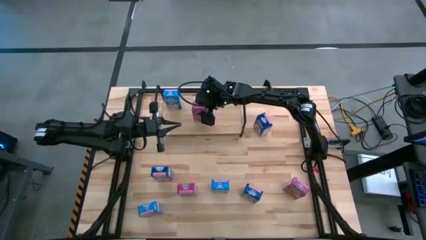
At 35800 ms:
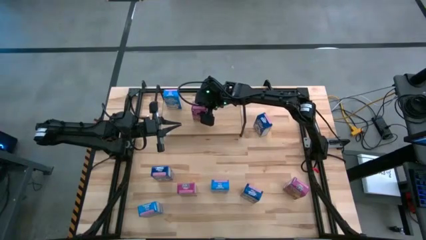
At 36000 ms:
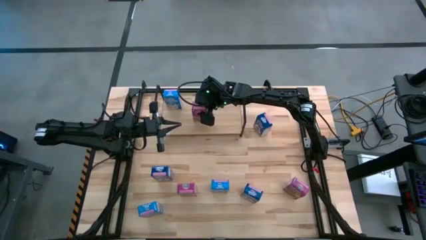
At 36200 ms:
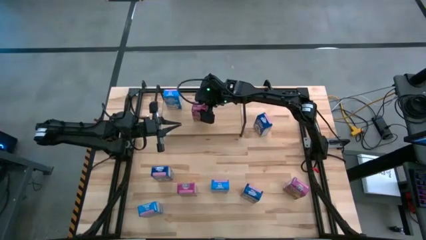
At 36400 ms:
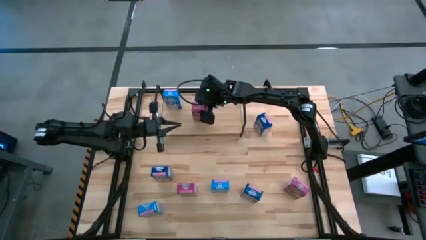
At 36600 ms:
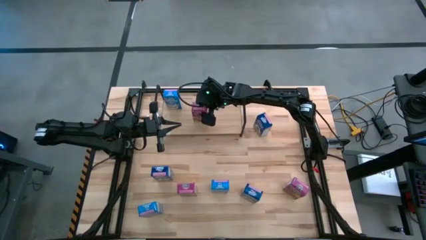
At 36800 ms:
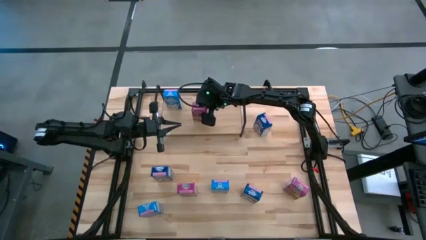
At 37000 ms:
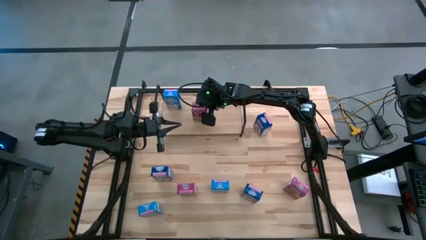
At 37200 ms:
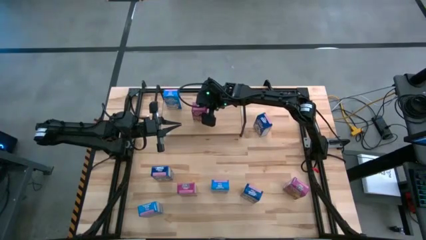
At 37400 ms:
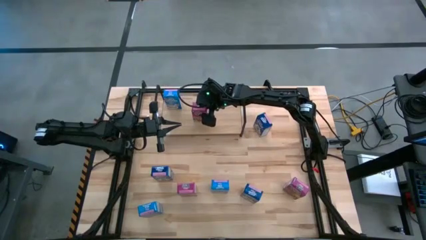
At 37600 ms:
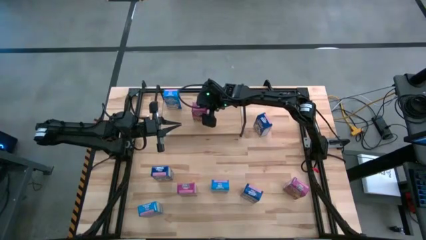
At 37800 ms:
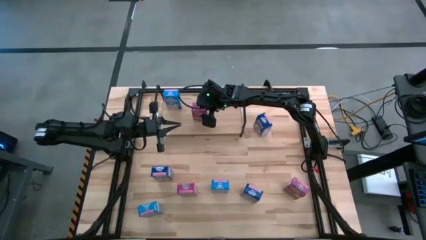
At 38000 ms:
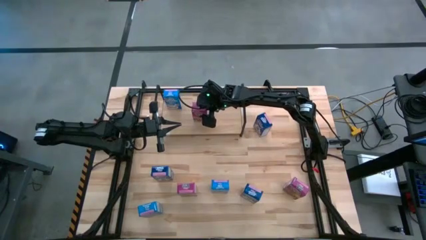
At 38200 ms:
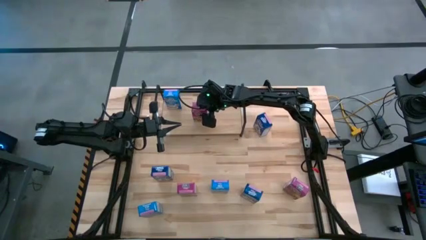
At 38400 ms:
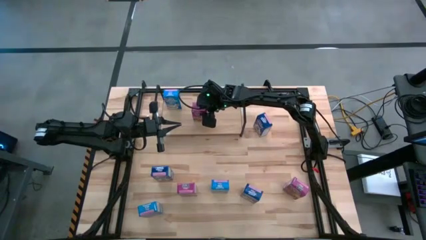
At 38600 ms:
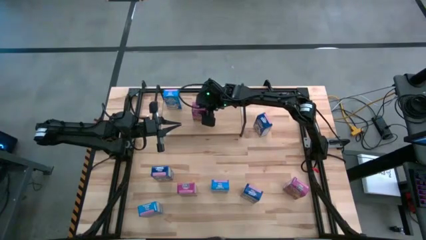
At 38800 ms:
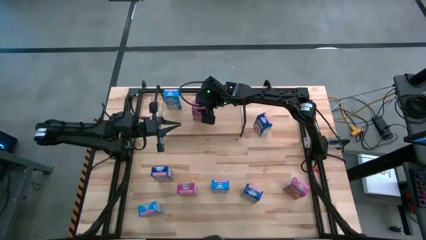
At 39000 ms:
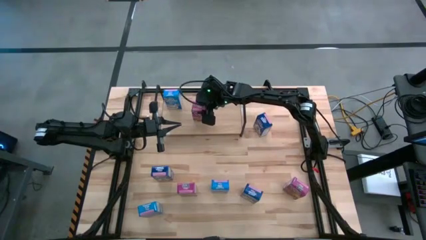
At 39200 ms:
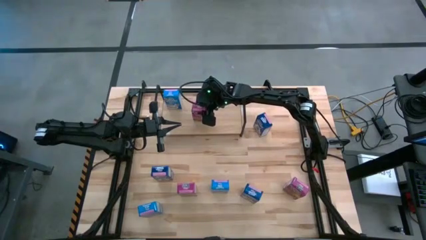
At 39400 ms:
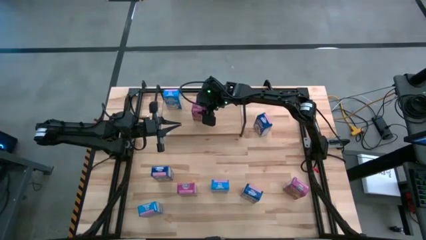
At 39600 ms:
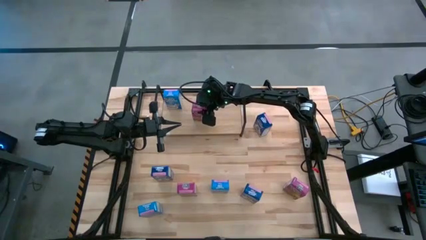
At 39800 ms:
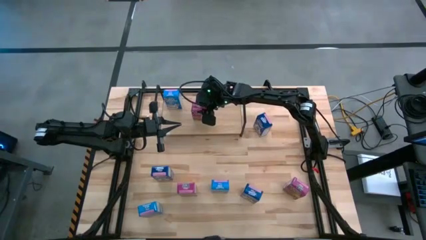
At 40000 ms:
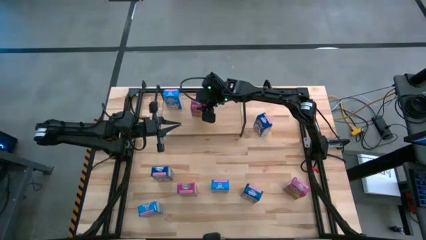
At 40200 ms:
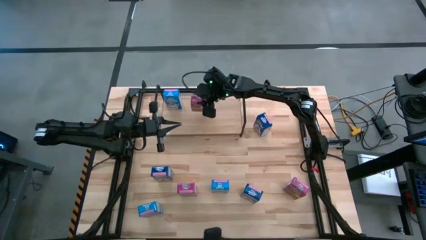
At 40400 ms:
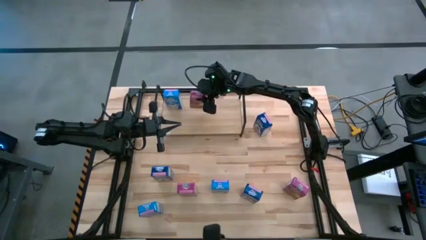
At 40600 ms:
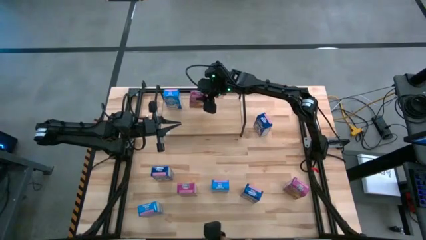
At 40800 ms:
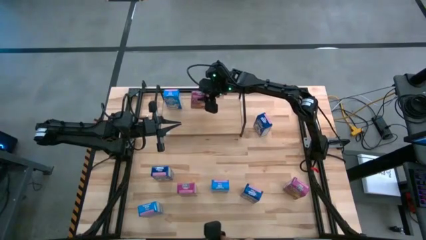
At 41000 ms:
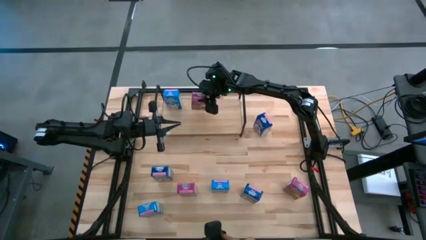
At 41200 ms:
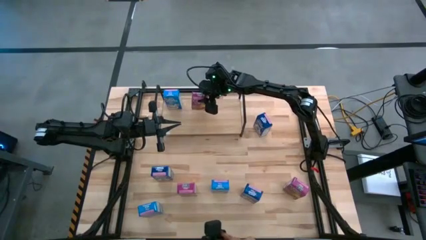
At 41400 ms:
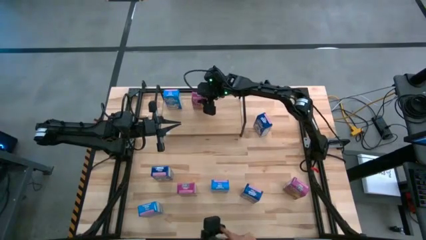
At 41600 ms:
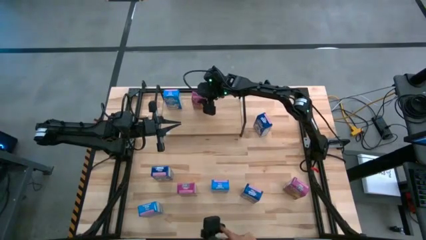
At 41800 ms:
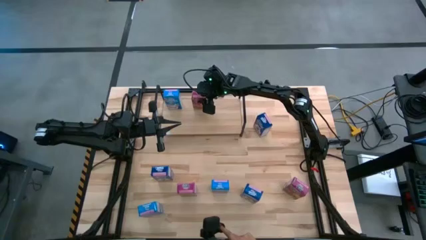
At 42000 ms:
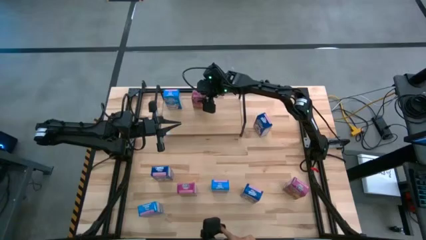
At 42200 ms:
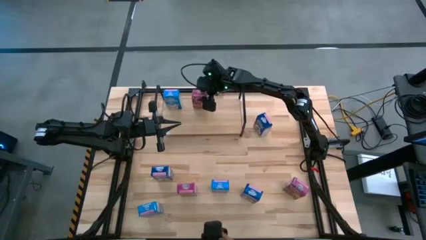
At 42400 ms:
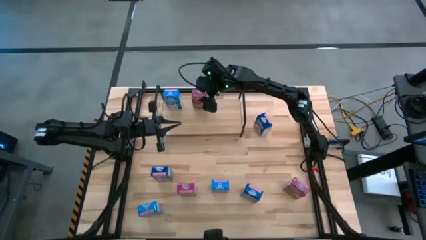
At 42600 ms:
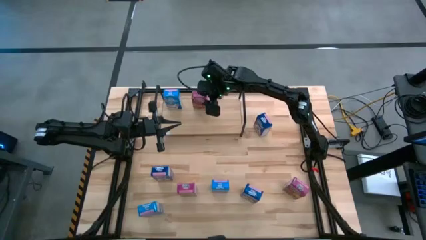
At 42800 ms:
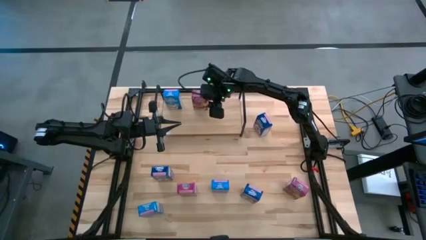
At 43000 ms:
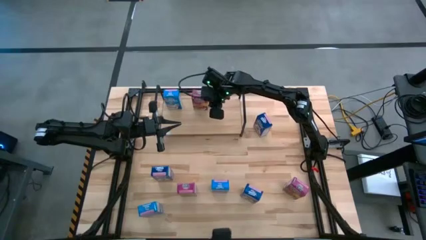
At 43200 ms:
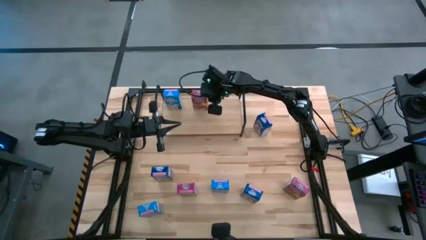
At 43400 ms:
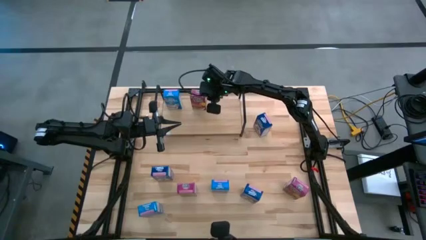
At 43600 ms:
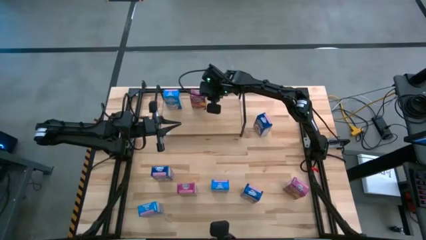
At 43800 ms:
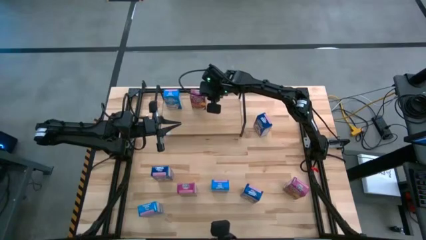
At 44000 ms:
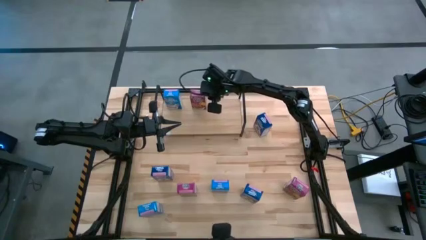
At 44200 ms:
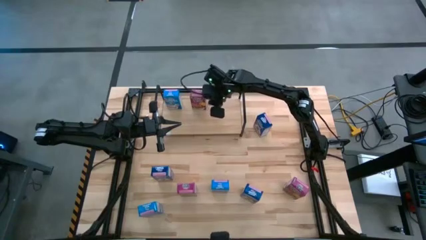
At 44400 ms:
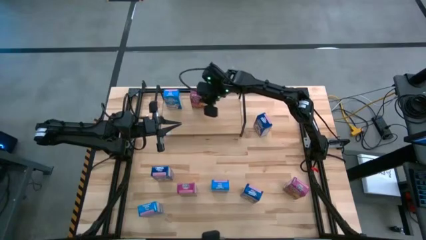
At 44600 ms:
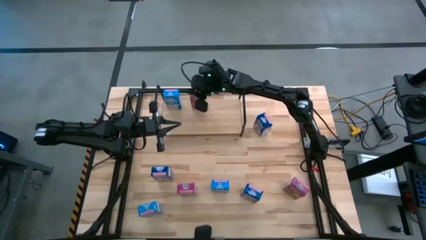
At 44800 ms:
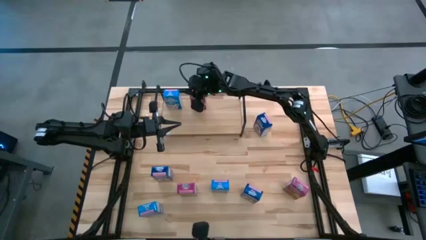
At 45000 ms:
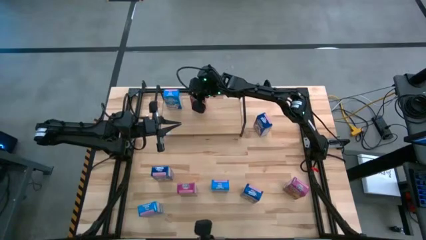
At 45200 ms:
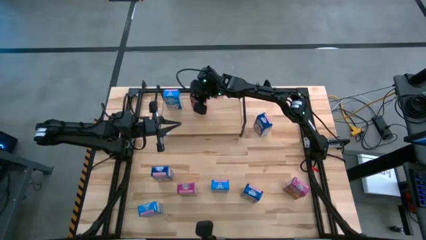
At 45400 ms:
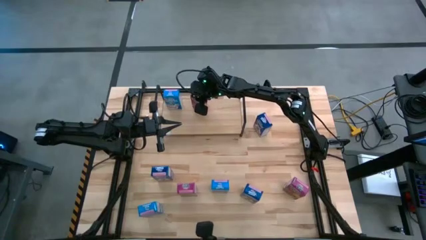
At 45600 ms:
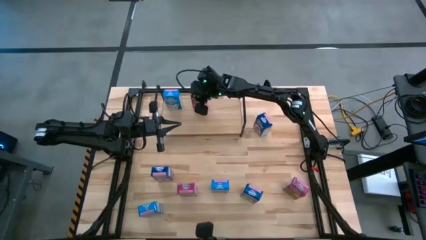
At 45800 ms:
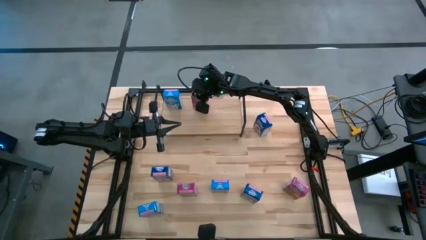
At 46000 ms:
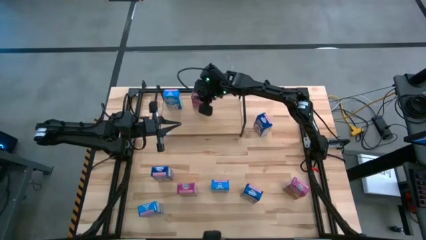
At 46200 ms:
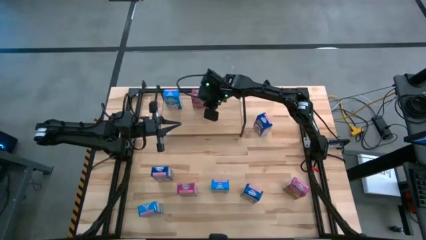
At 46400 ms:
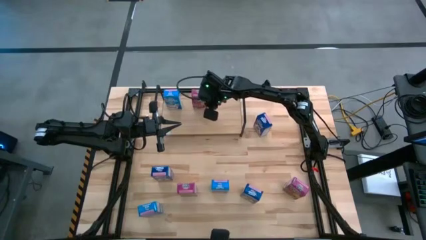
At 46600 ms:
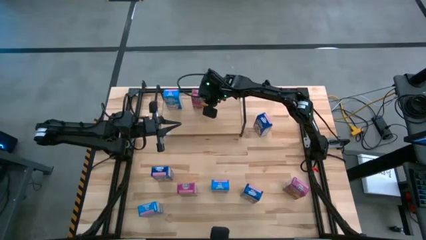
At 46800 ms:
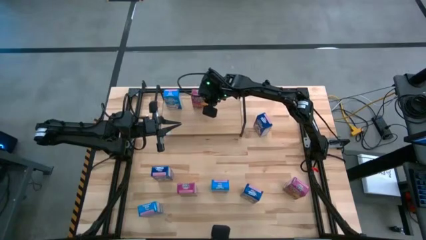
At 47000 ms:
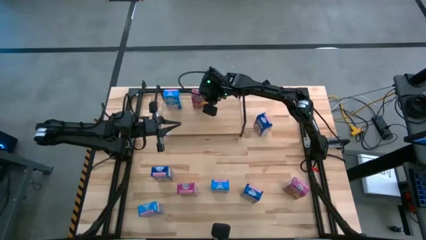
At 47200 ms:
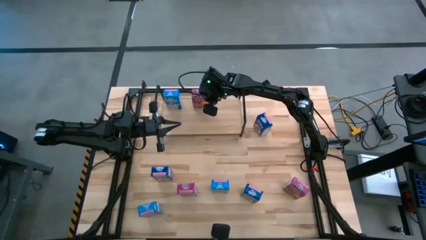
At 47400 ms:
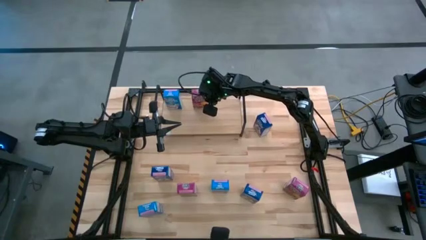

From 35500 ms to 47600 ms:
Task: Stack cereal on shelf
Put the top violet cereal box on the shelf

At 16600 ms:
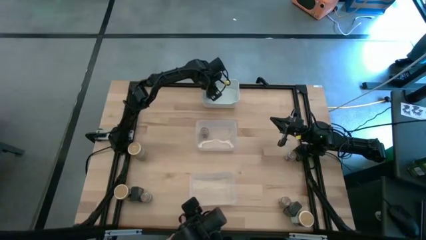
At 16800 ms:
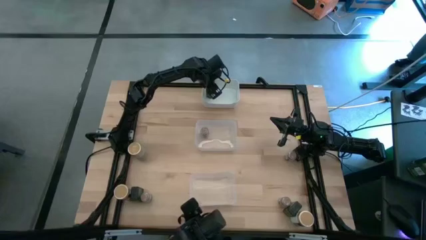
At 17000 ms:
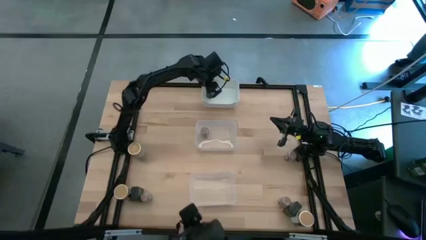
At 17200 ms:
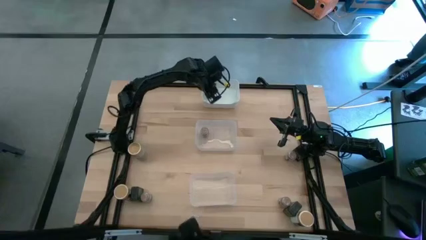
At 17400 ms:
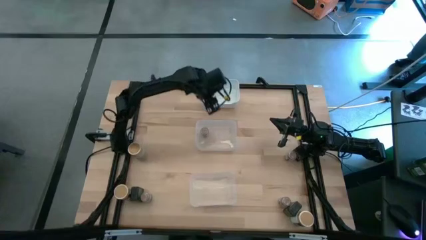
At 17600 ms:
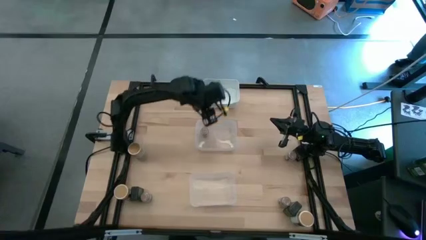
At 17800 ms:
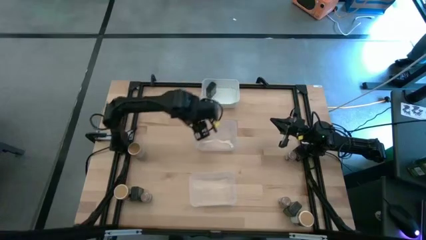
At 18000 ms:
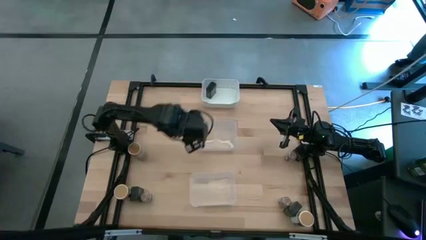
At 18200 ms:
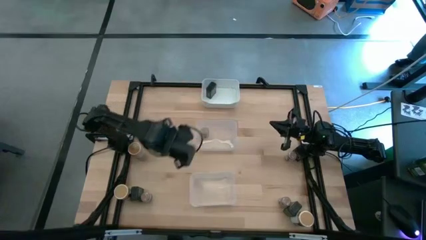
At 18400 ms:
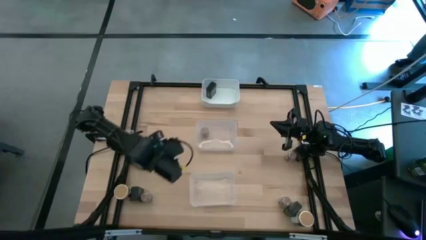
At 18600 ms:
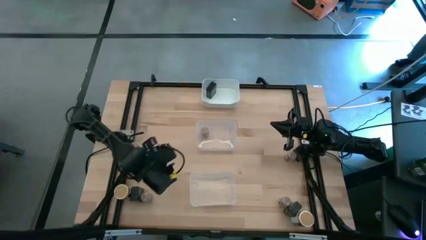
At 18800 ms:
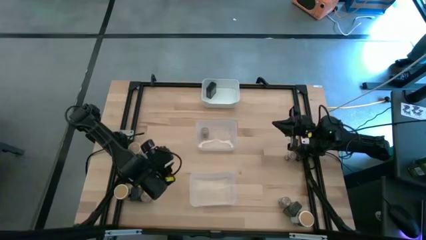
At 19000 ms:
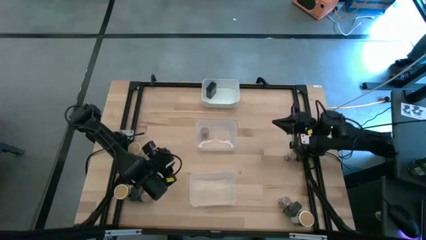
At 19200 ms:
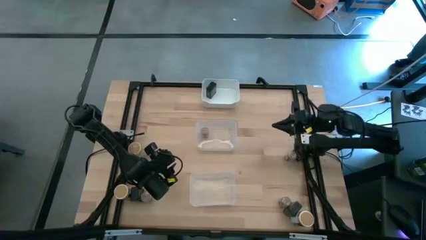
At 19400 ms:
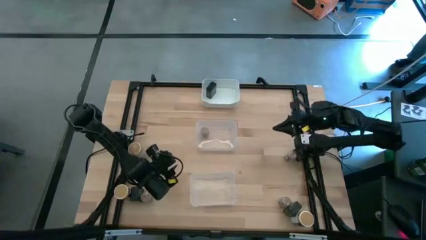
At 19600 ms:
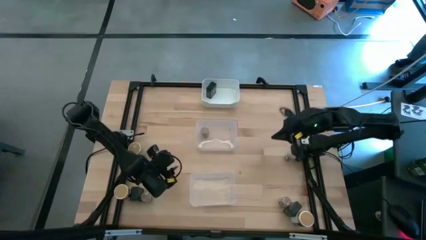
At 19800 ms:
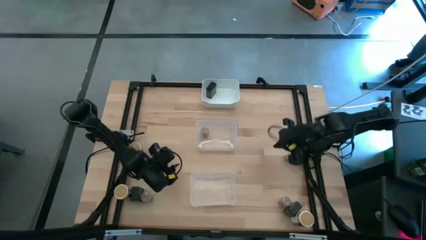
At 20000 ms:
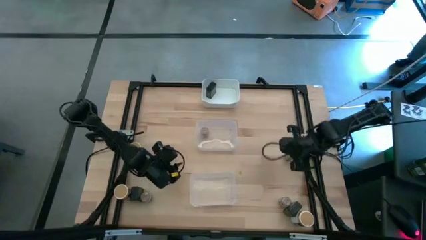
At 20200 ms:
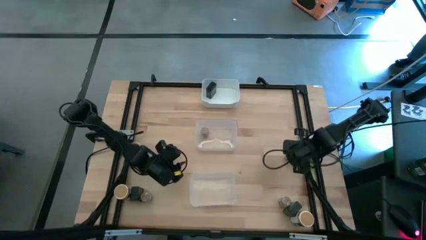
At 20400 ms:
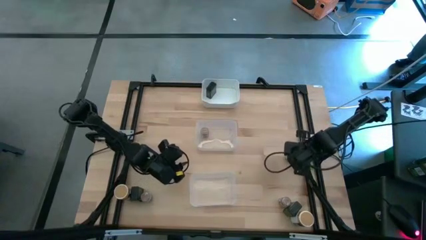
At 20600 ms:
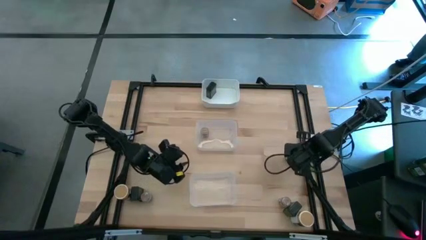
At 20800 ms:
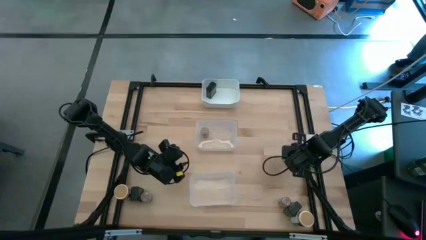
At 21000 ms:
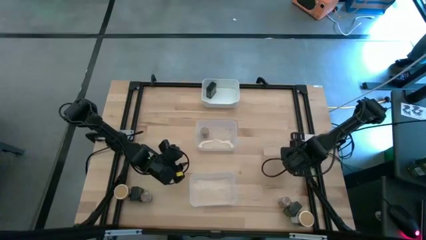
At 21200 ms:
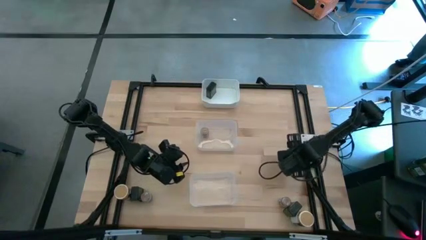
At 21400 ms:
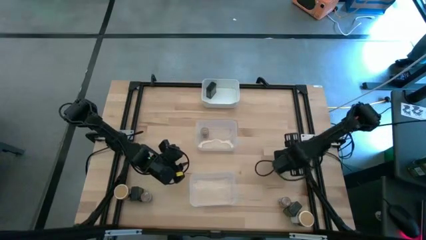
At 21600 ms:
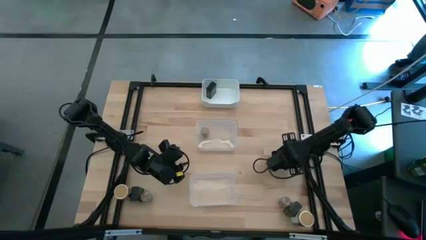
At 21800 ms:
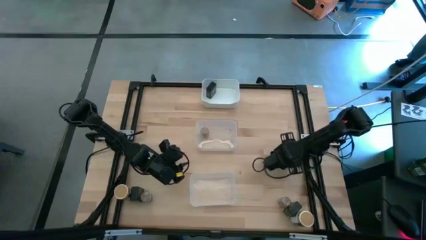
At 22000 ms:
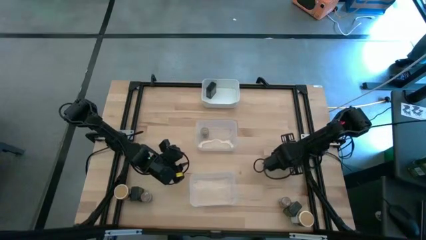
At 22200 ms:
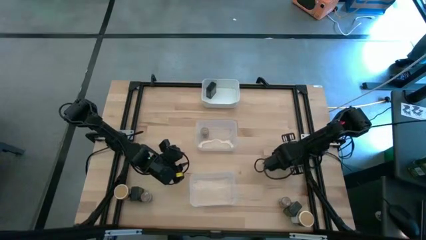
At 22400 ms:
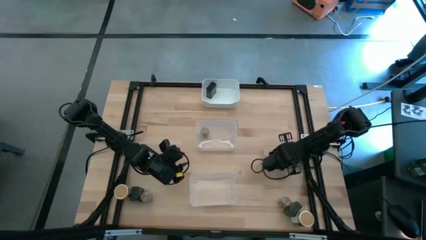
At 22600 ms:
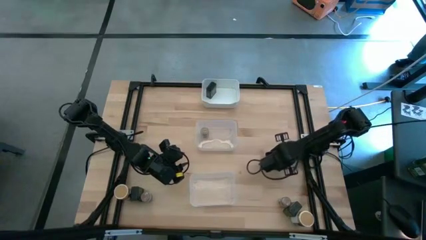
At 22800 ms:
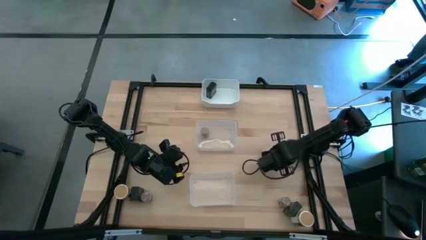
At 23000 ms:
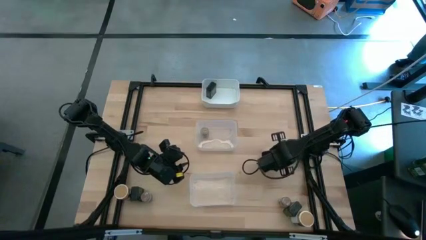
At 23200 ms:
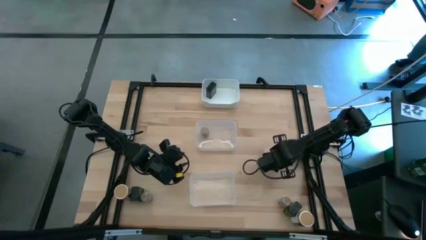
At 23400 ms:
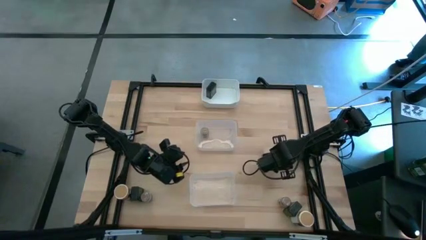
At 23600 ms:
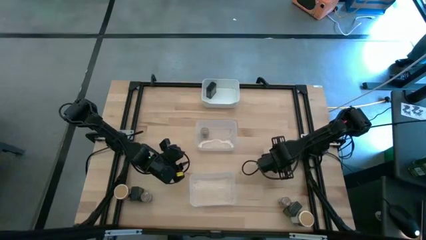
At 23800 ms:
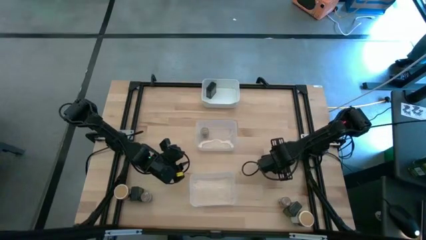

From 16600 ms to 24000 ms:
Task: Sort spices by type
Put the top right small brown seasoning bottle into the top transparent bin
